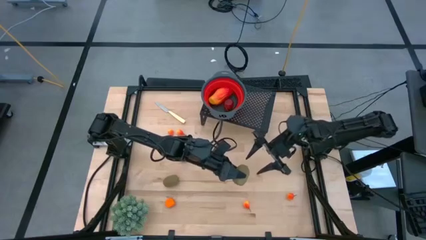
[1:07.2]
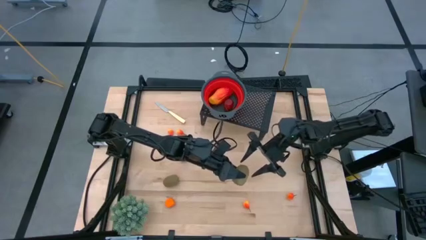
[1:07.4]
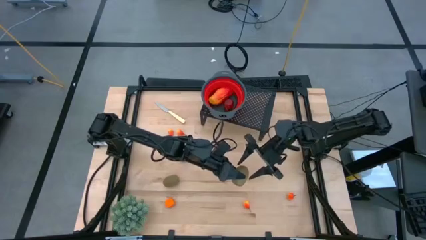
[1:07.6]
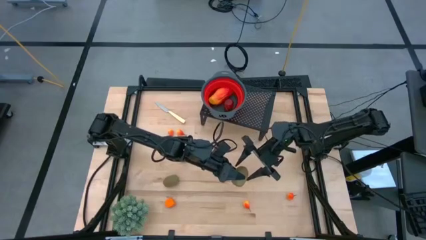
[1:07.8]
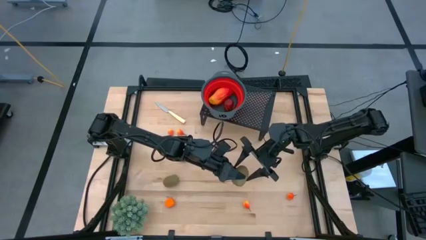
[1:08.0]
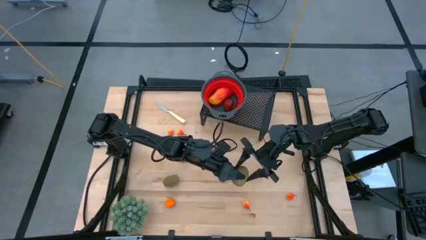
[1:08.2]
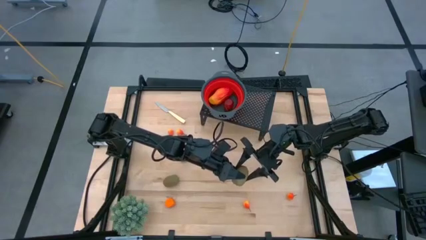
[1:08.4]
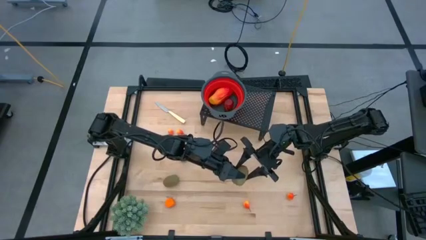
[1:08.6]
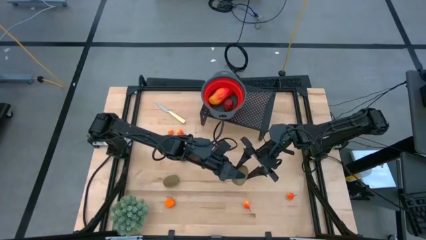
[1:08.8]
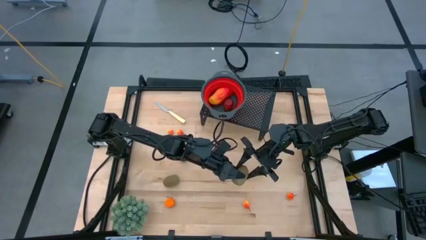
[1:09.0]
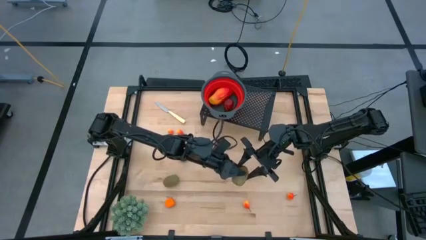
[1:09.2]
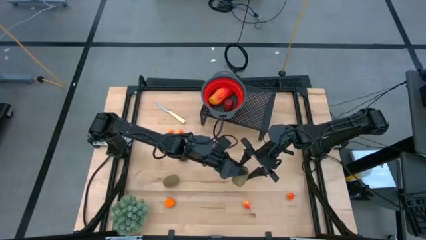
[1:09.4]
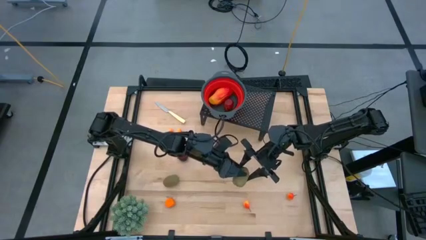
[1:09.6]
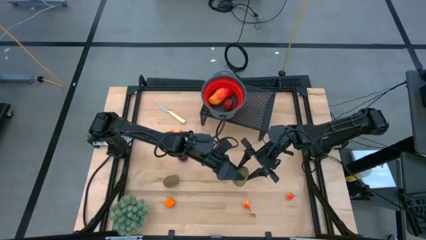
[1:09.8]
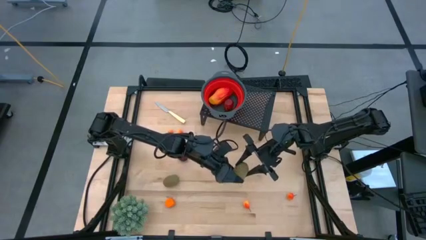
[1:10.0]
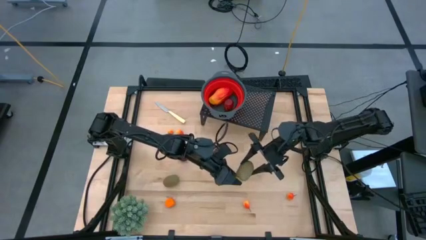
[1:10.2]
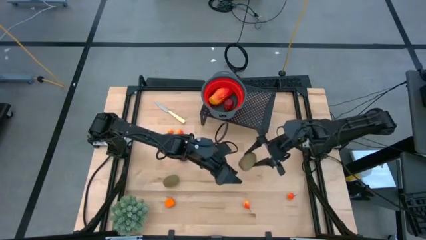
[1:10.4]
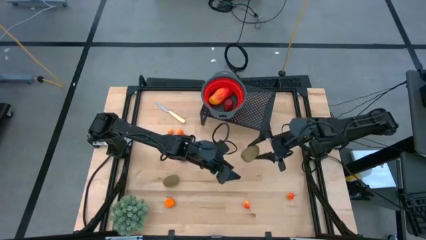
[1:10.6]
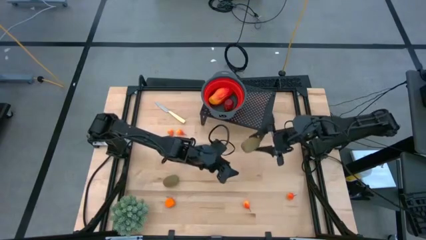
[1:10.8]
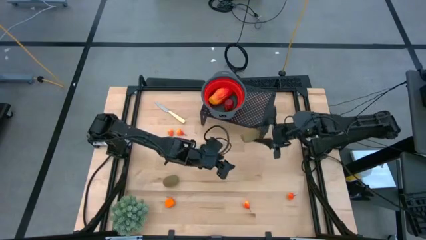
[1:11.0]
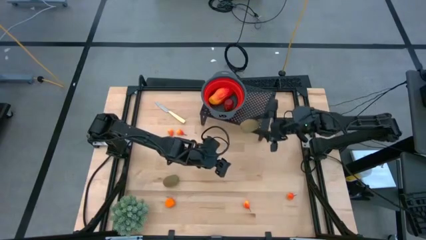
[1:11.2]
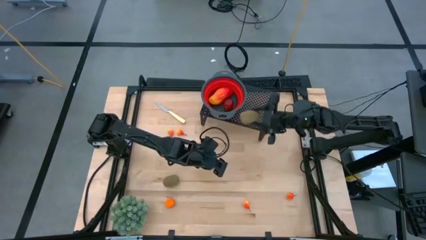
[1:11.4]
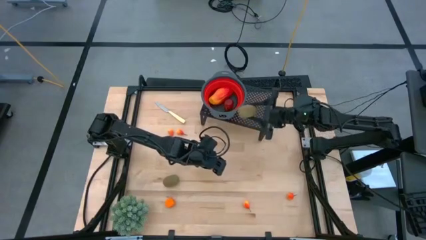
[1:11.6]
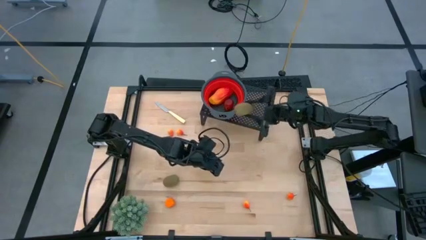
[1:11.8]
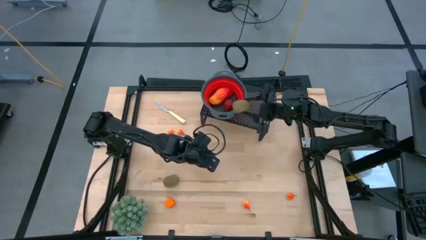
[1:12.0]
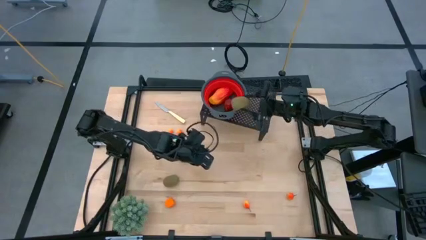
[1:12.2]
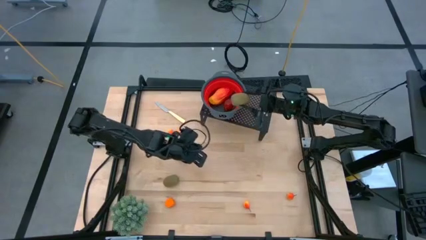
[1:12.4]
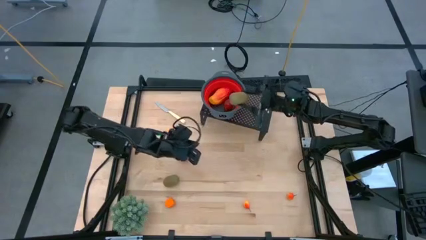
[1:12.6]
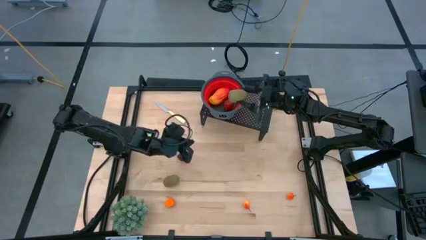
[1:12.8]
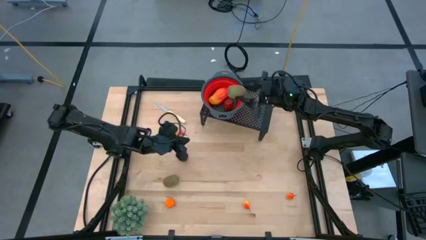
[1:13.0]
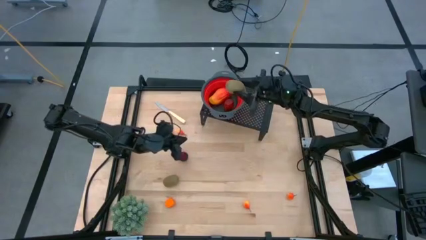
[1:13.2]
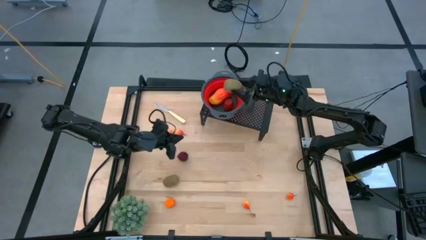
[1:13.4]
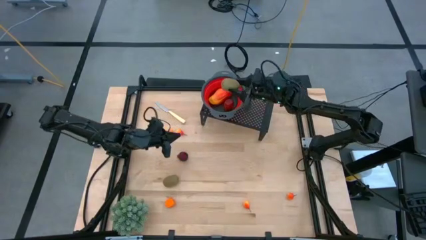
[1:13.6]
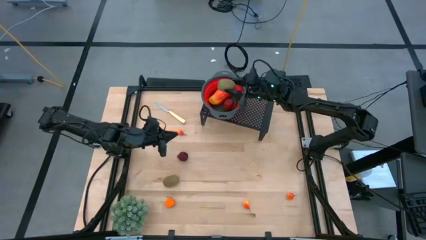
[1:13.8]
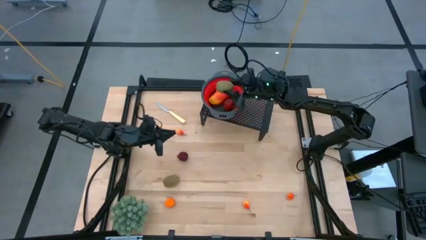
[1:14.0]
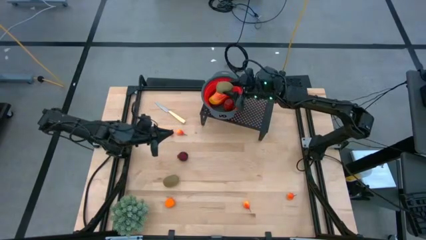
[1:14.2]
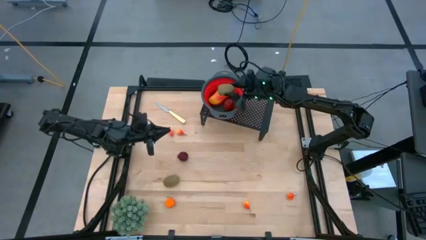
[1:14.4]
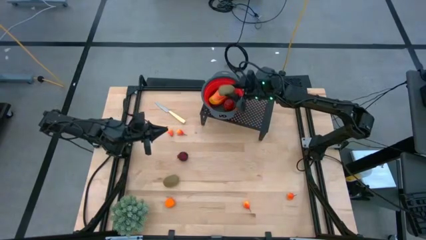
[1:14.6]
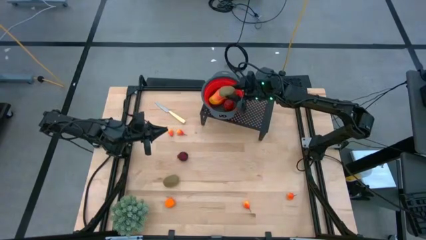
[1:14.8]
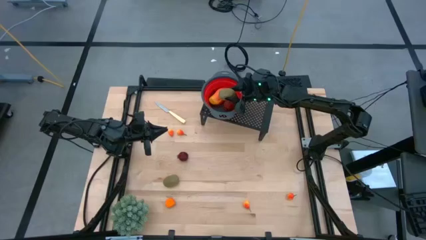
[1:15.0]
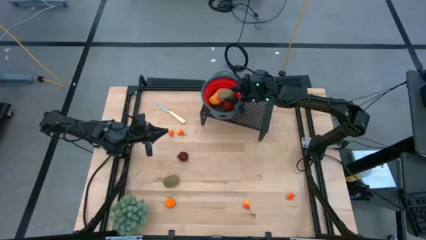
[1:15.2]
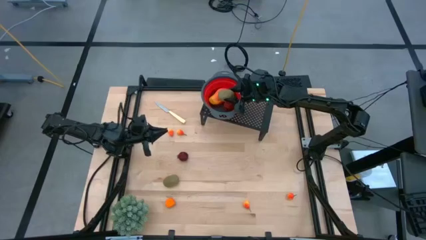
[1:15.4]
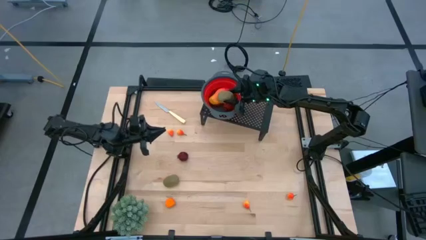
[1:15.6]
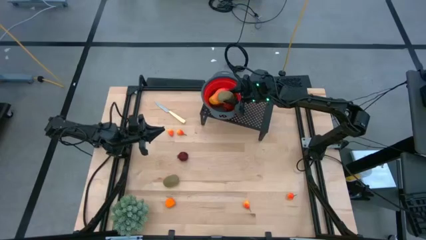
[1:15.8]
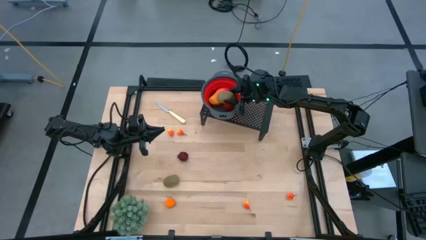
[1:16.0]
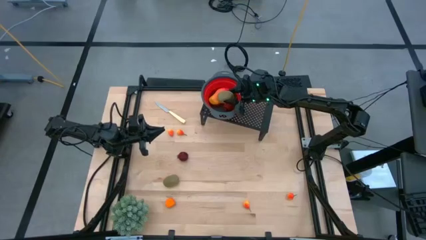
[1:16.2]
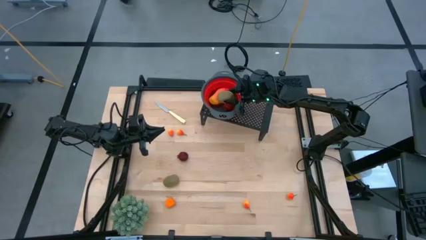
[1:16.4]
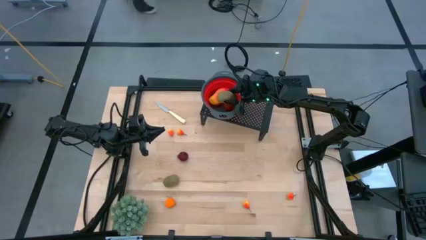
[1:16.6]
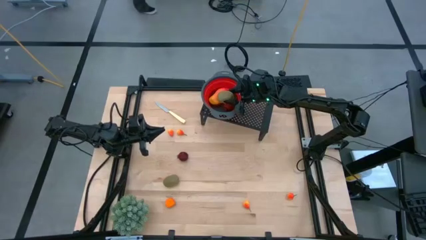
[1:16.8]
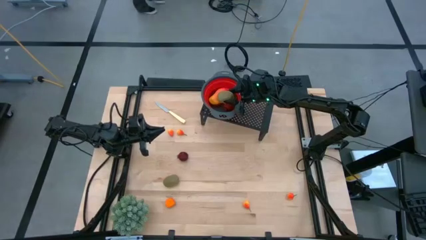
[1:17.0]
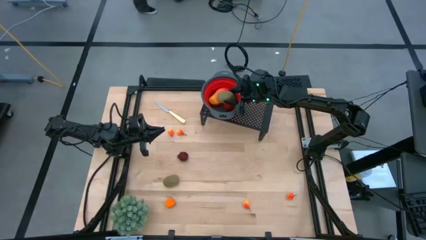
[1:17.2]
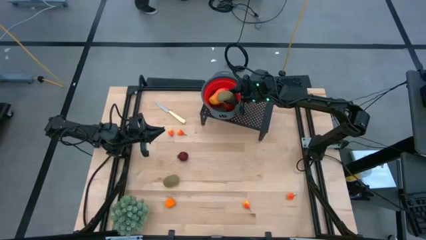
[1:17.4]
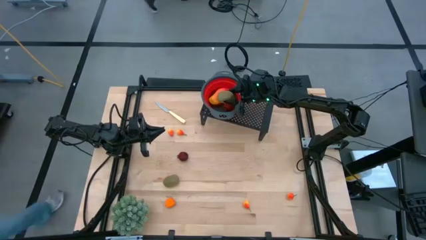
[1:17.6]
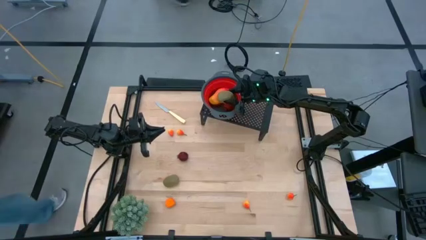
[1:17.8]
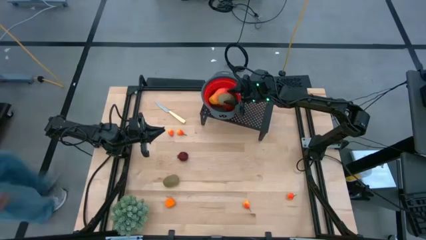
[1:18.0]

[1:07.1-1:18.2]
Task: Pick & Place Fruit
Put the top kiwi into the strainer bowl on the shelf
